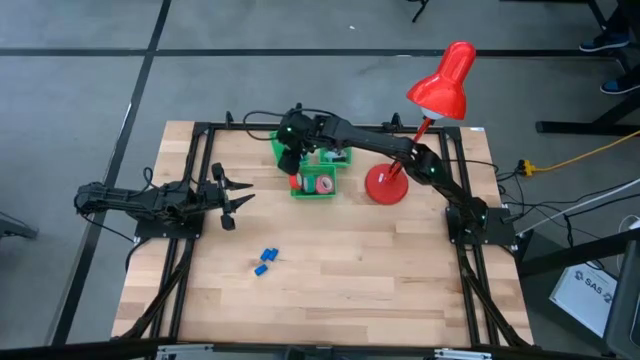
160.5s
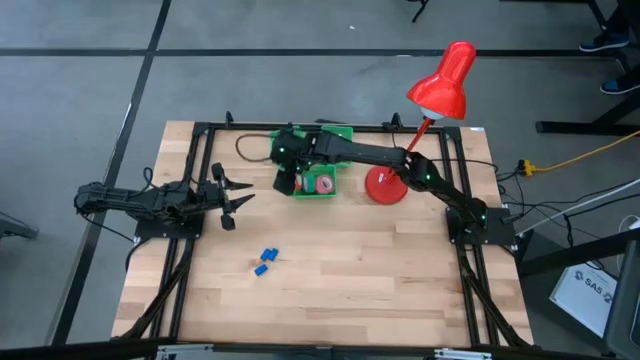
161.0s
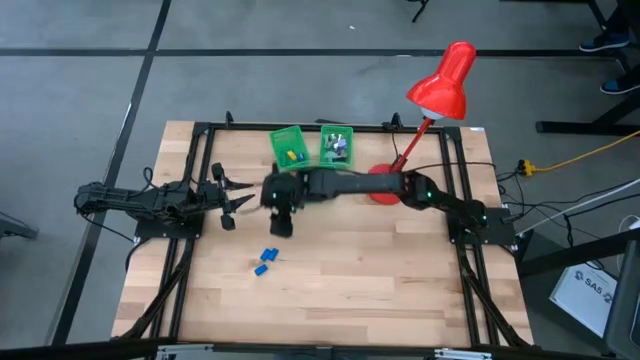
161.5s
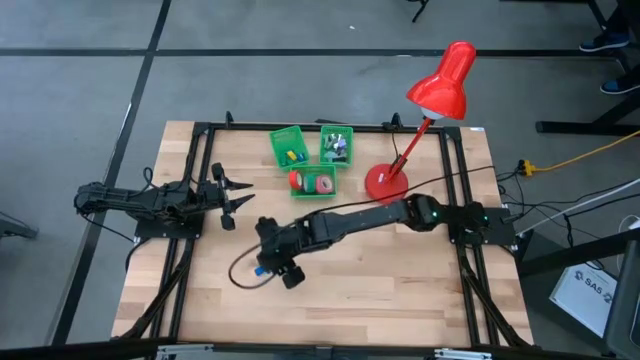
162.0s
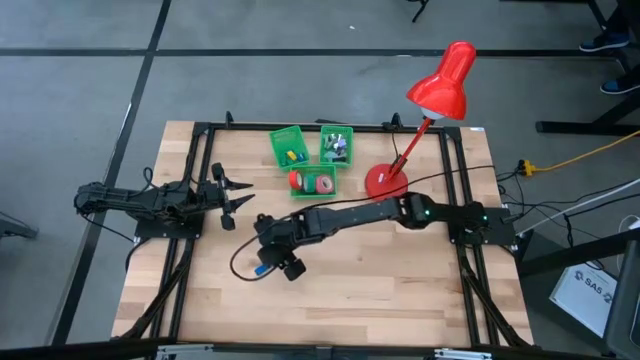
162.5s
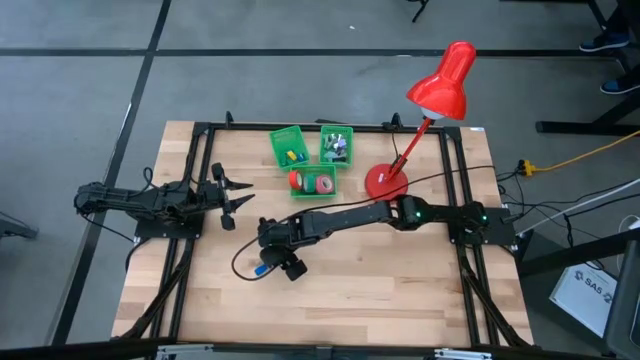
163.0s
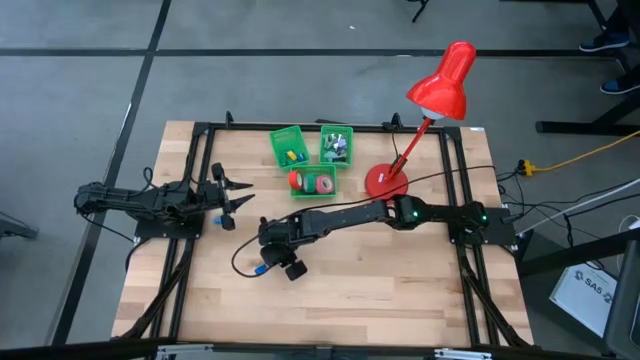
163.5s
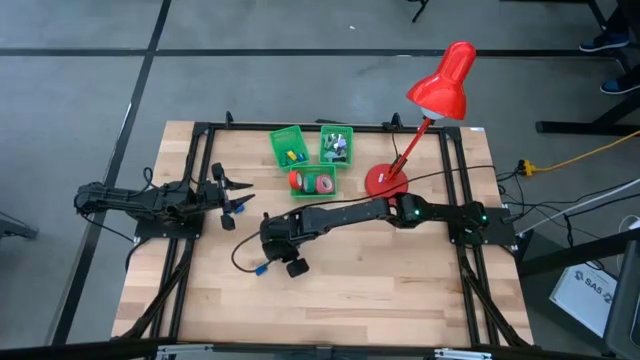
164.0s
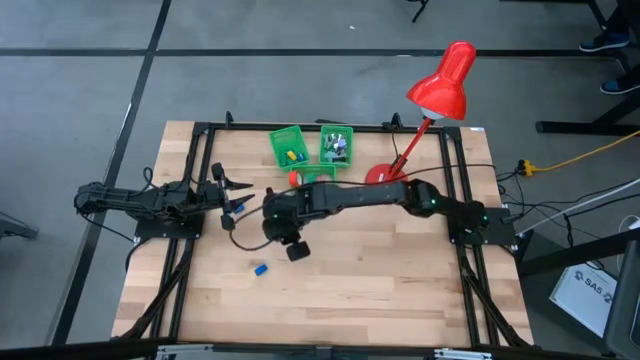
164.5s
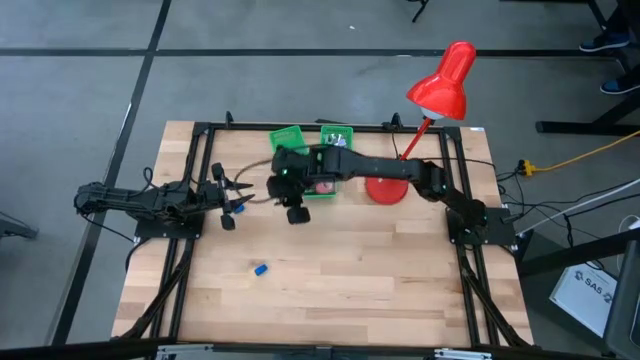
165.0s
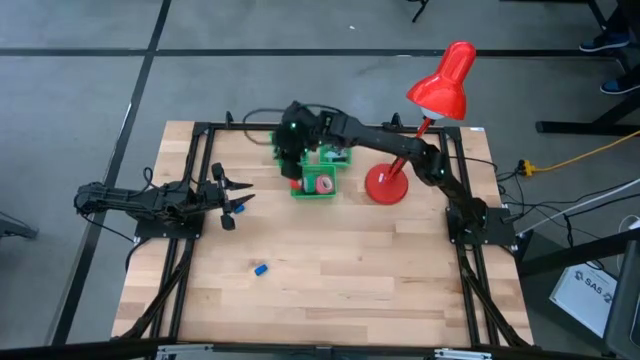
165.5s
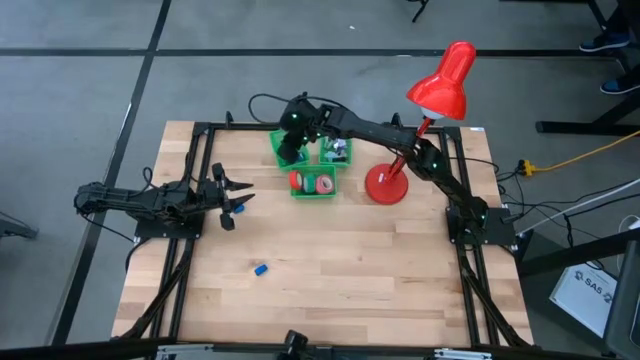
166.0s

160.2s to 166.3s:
Task: Pick and place Stapler, Stapler remover, tape
Put the blue stapler into the left green bin

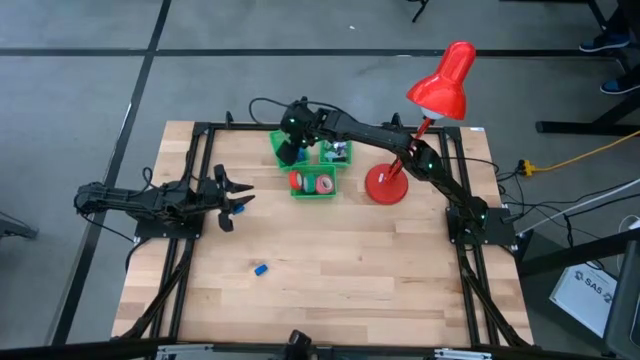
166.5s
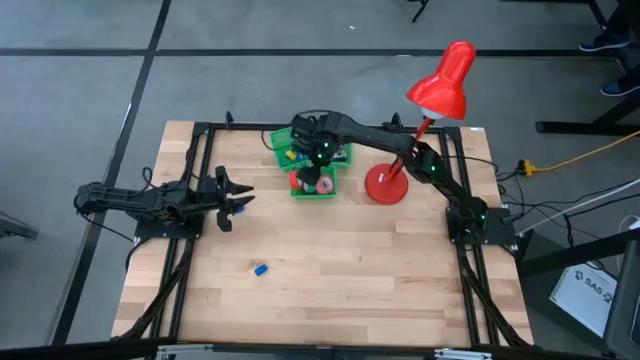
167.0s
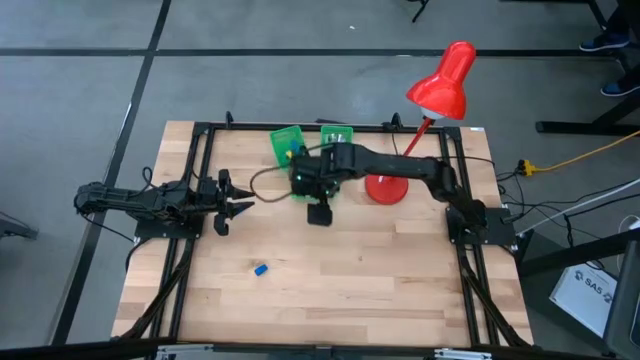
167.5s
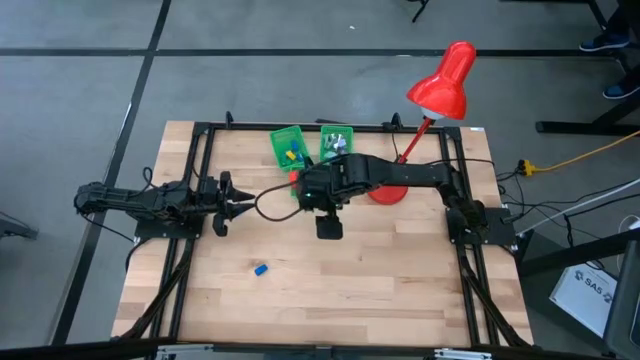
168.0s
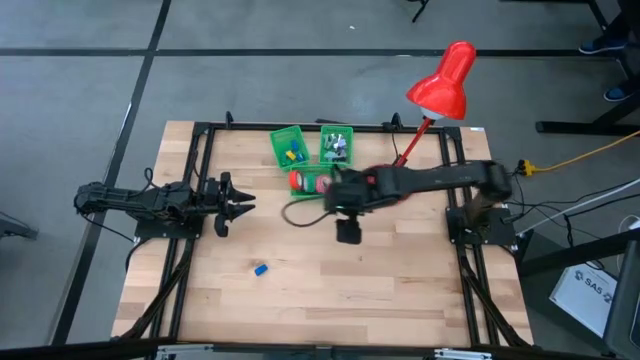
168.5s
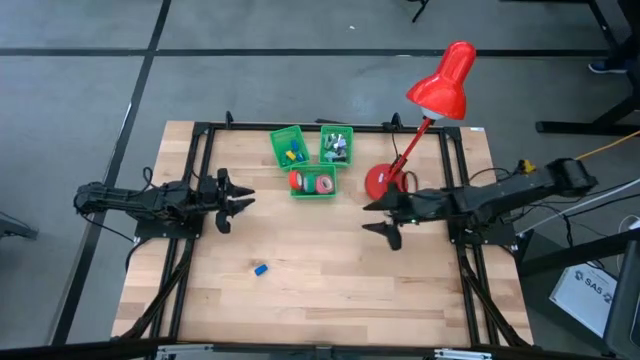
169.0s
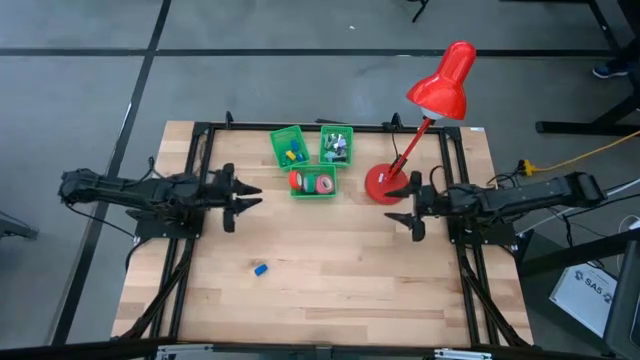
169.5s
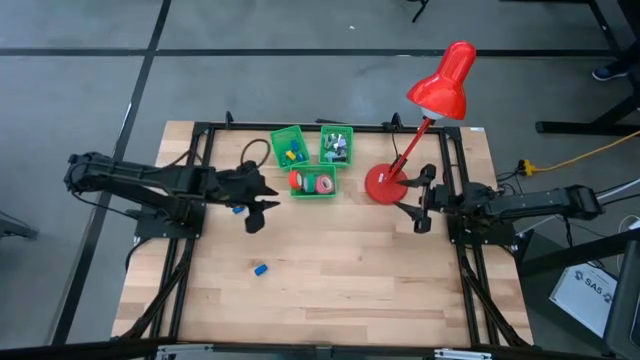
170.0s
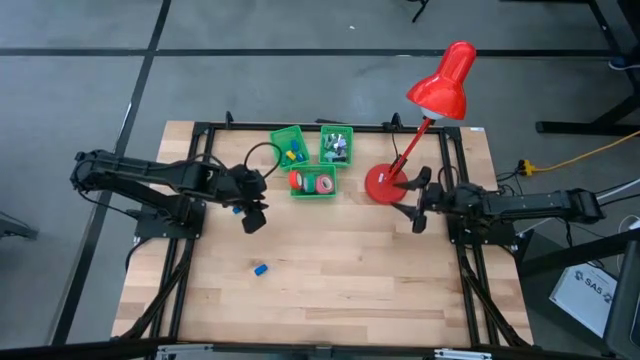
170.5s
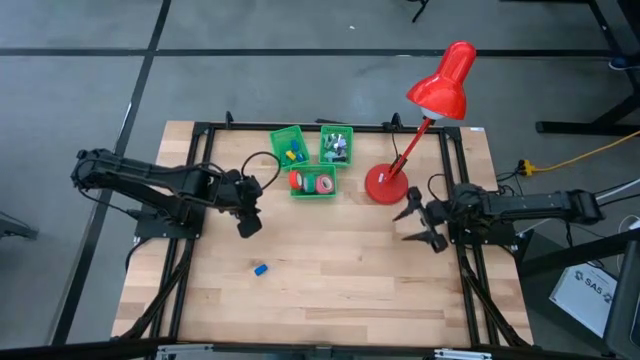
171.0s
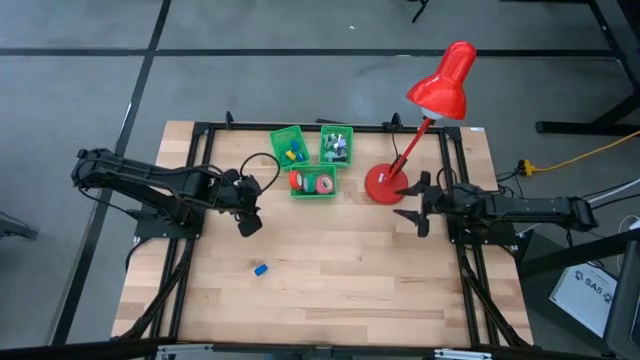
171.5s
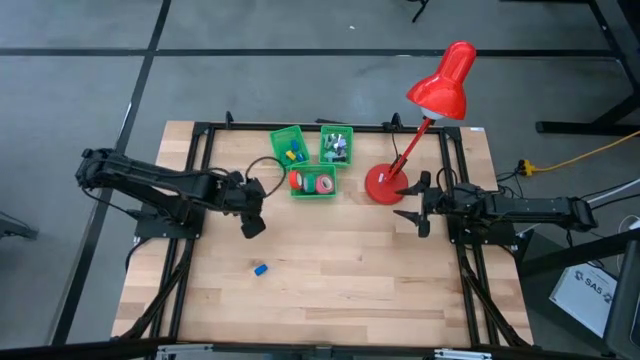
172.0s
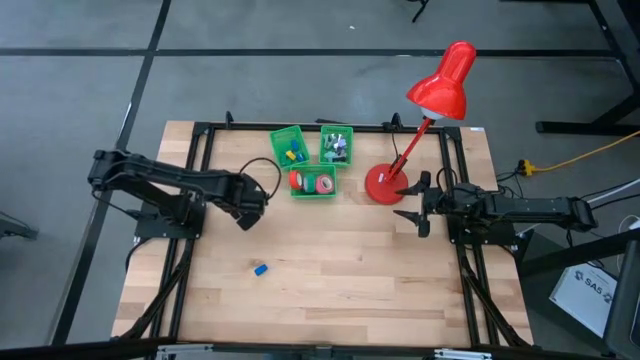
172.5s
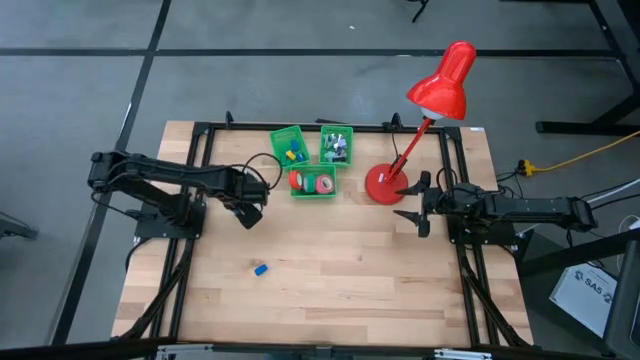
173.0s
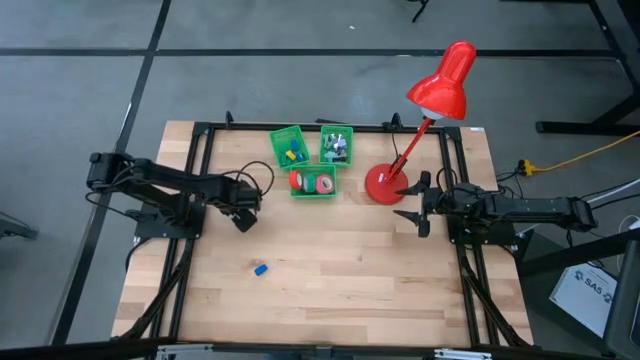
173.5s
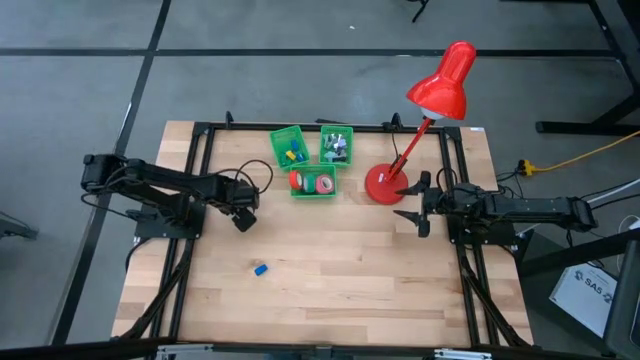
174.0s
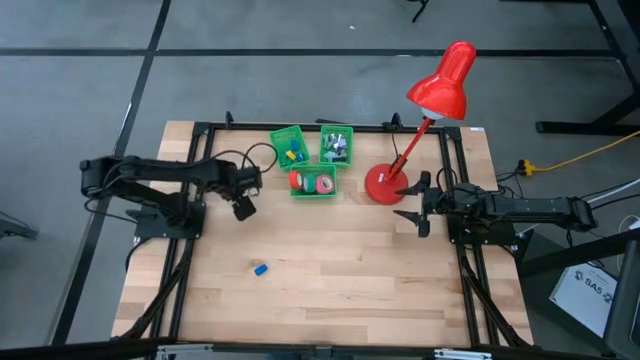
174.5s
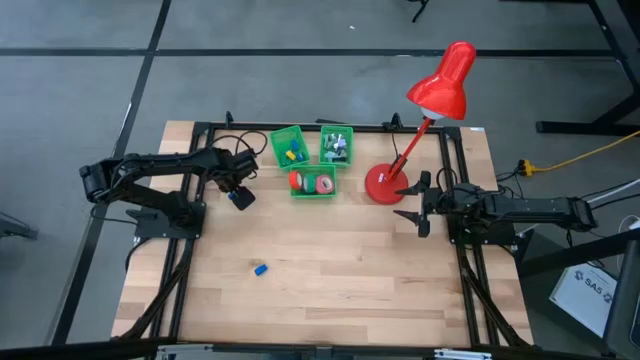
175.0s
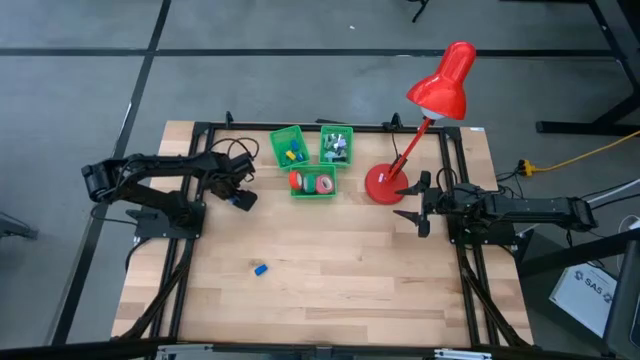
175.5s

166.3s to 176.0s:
Put the blue stapler into the left green bin

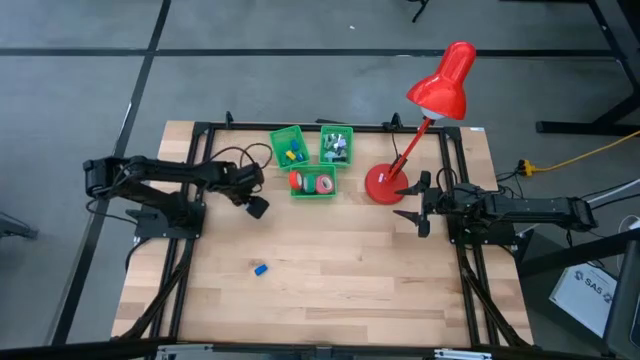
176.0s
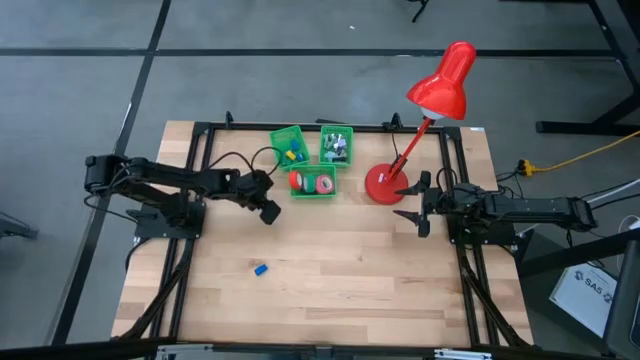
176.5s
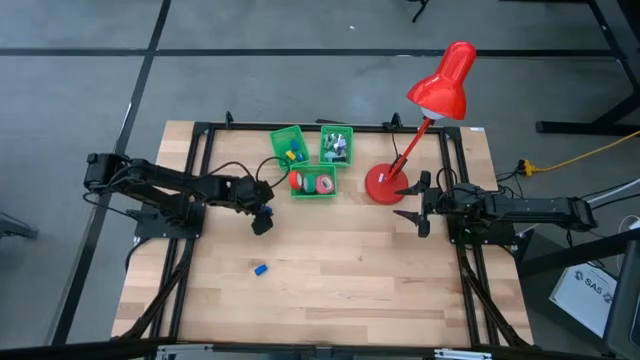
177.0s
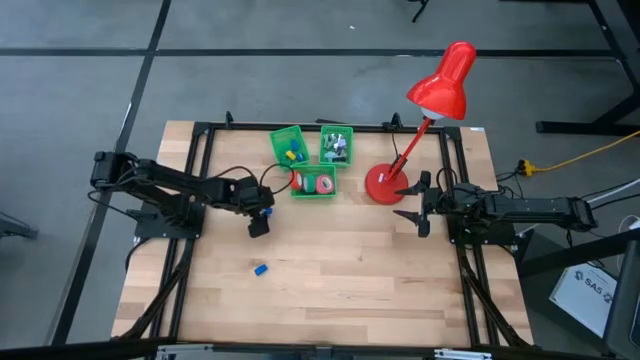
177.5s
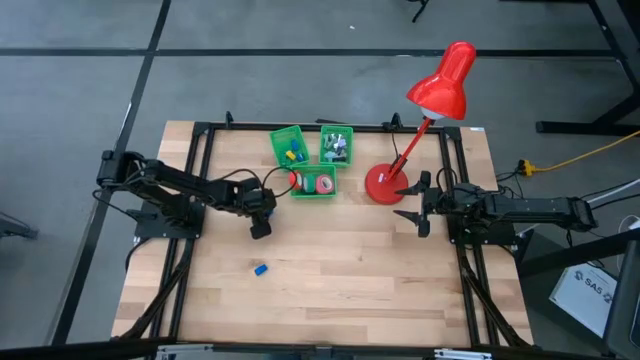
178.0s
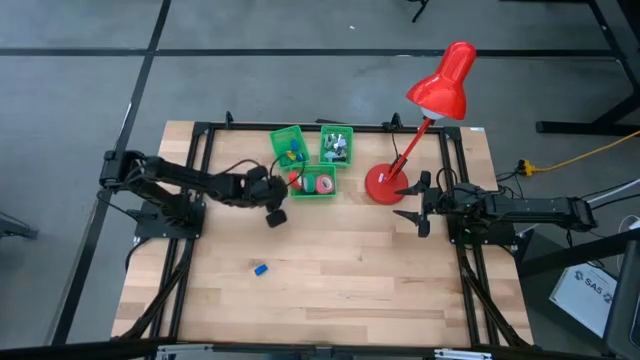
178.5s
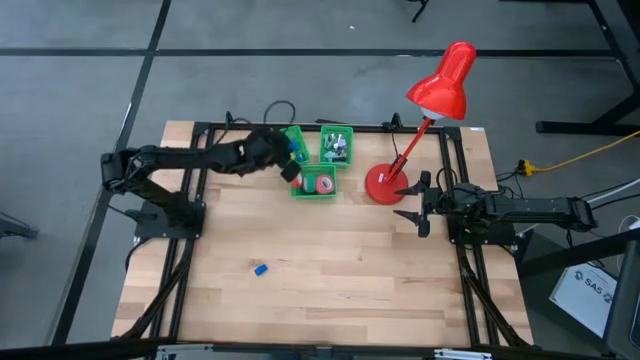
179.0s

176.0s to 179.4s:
Put the blue stapler into the left green bin

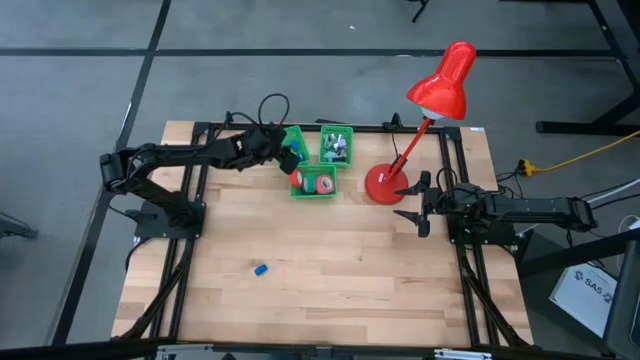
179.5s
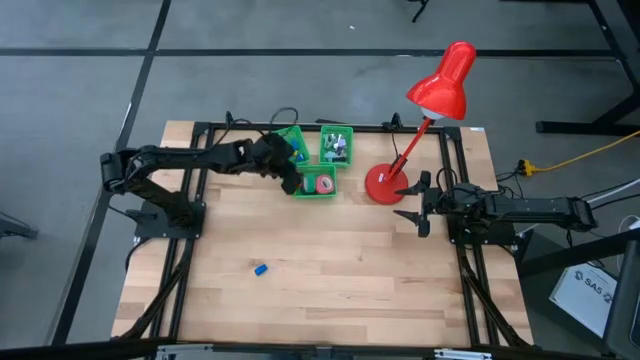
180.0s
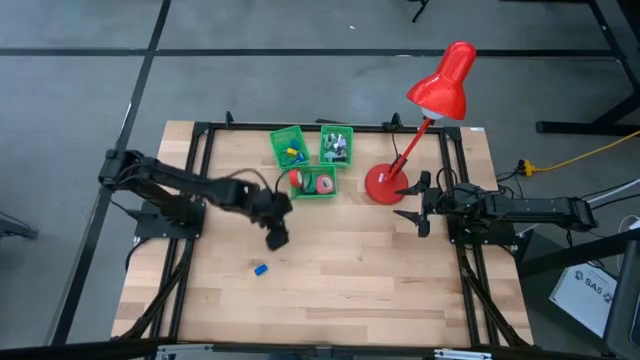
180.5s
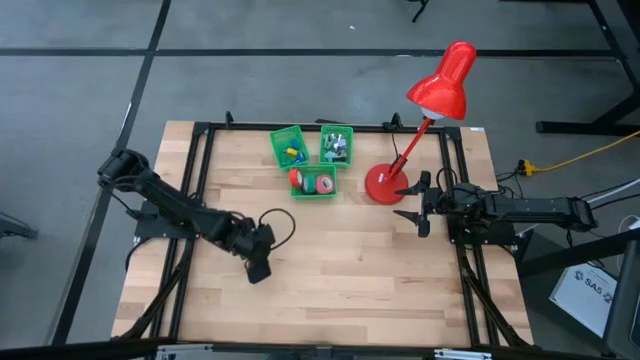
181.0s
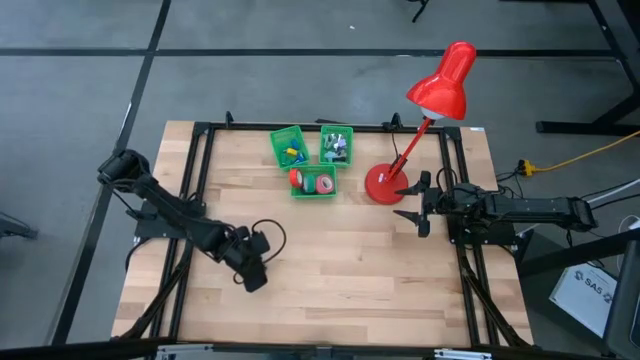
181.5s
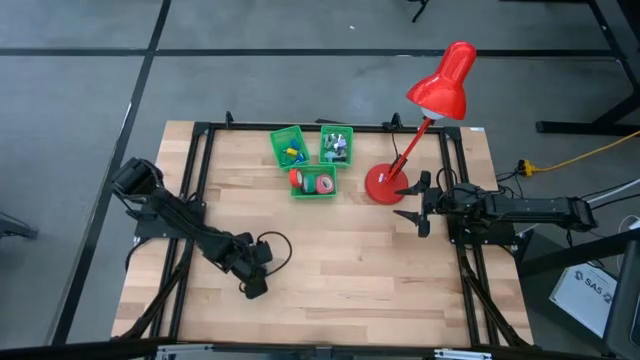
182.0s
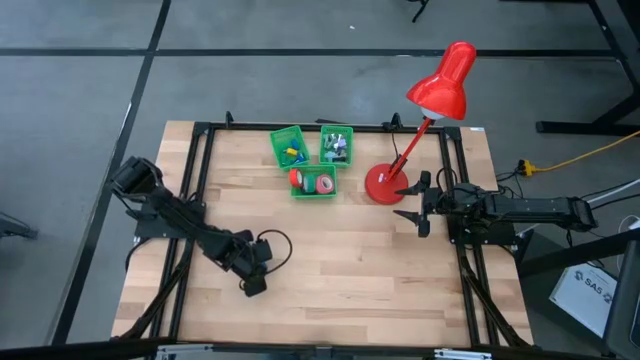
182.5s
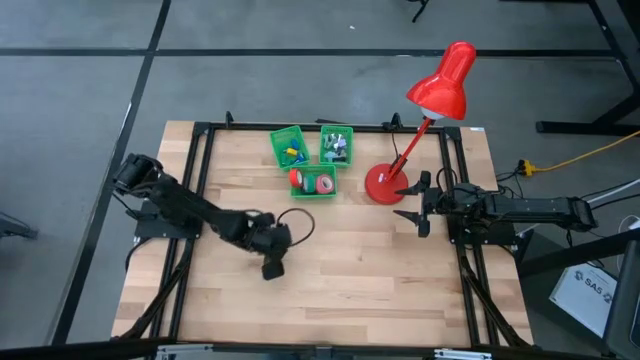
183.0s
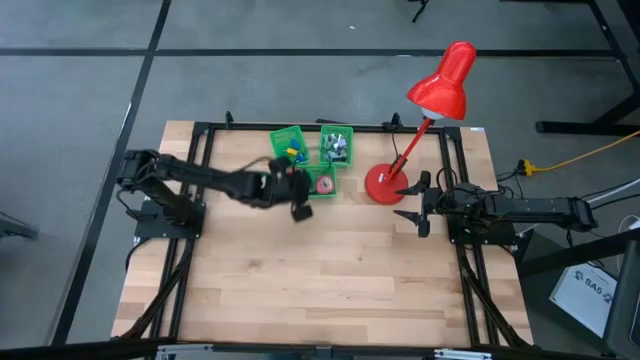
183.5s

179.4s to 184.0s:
Put the blue stapler into the left green bin
